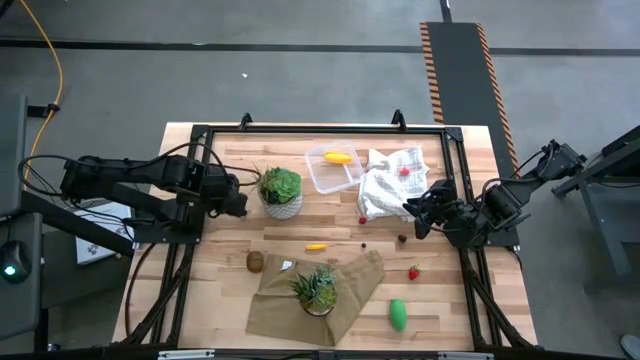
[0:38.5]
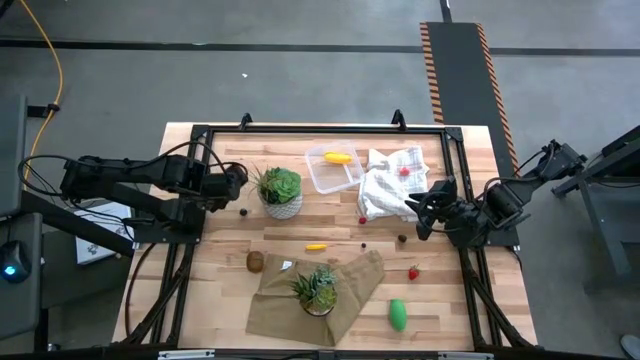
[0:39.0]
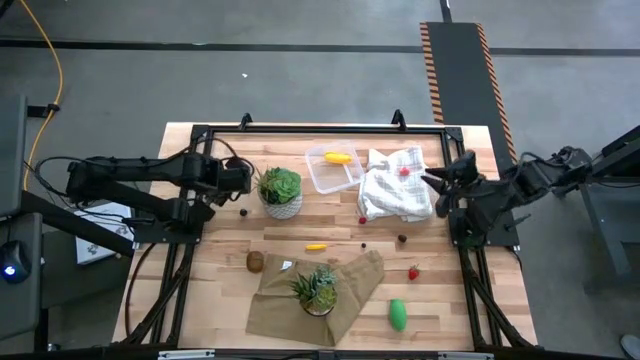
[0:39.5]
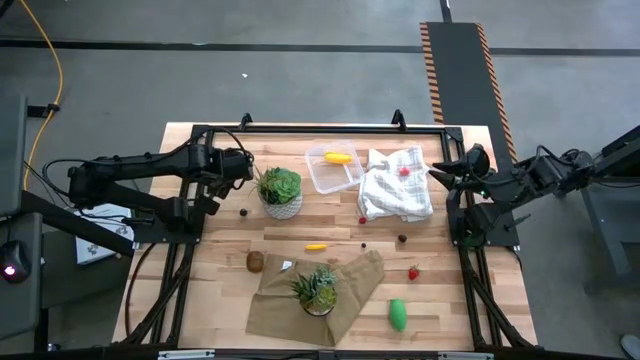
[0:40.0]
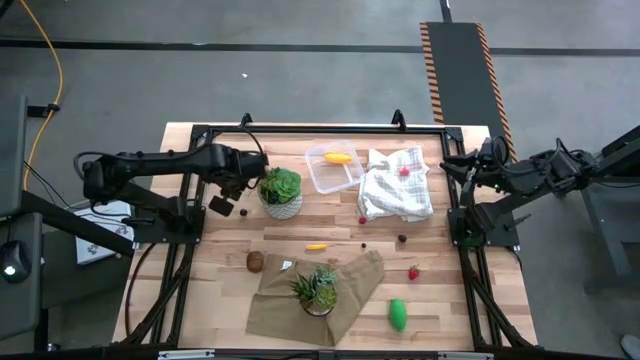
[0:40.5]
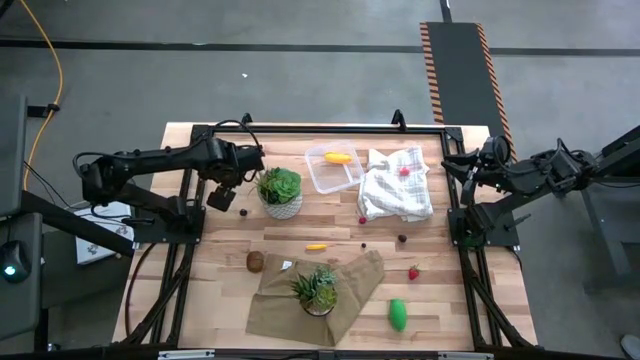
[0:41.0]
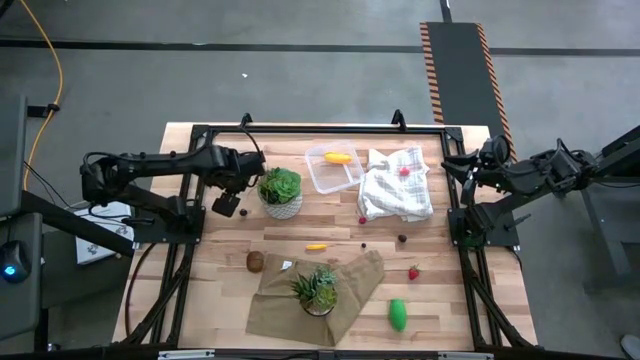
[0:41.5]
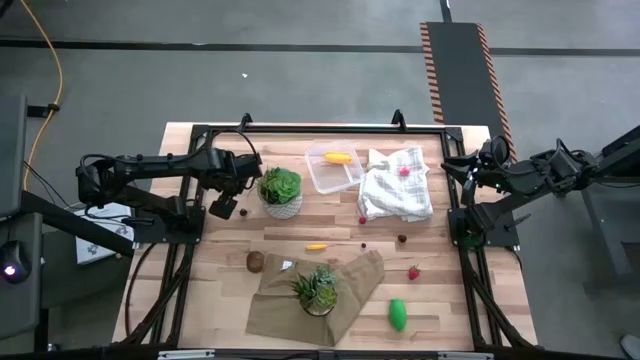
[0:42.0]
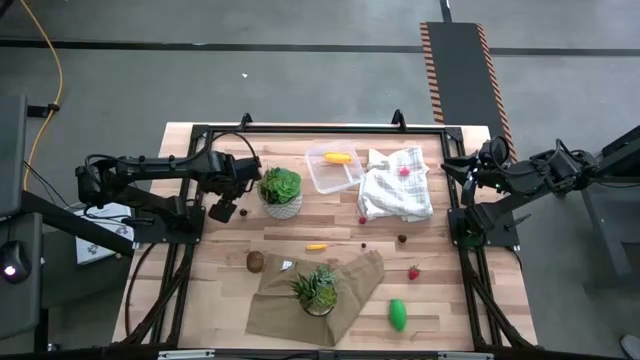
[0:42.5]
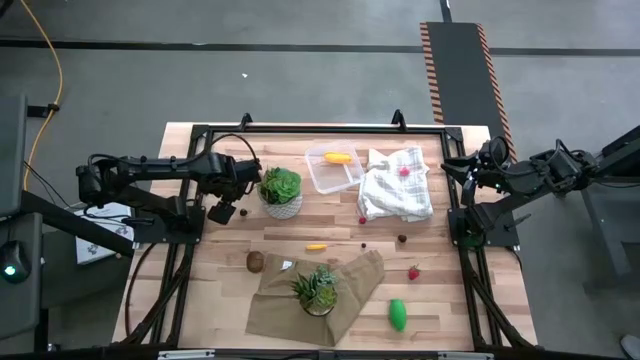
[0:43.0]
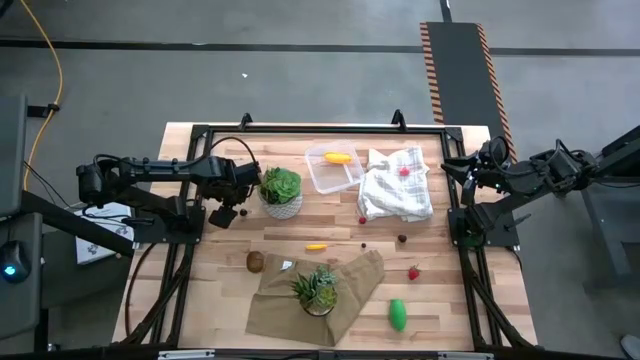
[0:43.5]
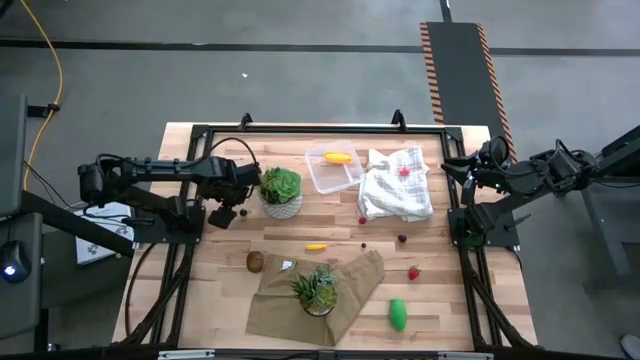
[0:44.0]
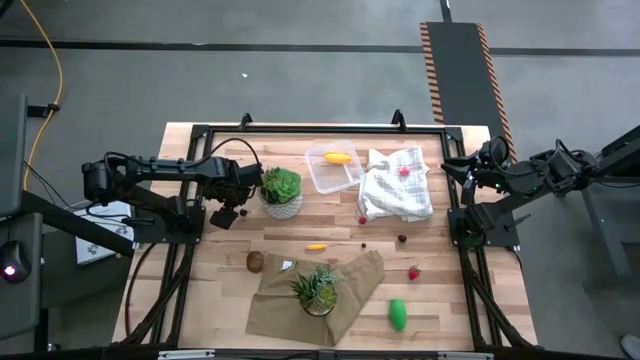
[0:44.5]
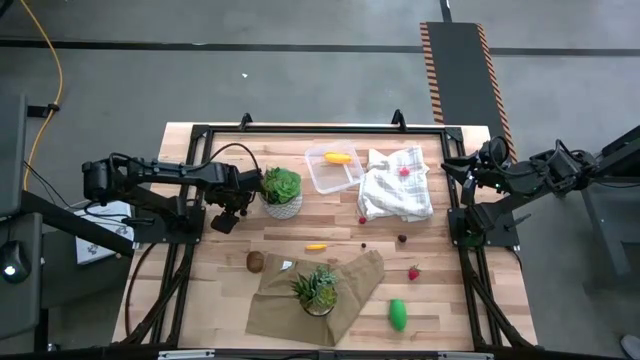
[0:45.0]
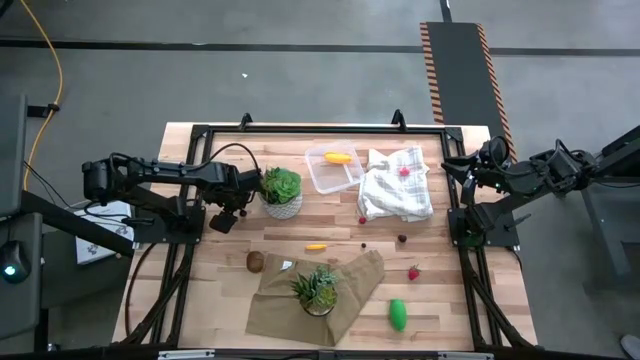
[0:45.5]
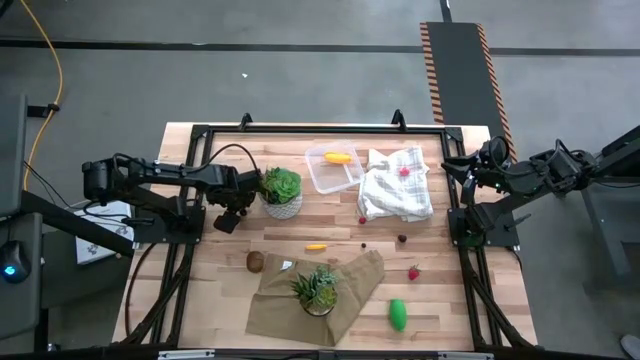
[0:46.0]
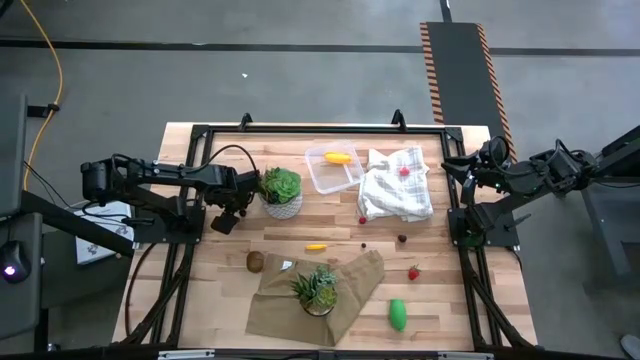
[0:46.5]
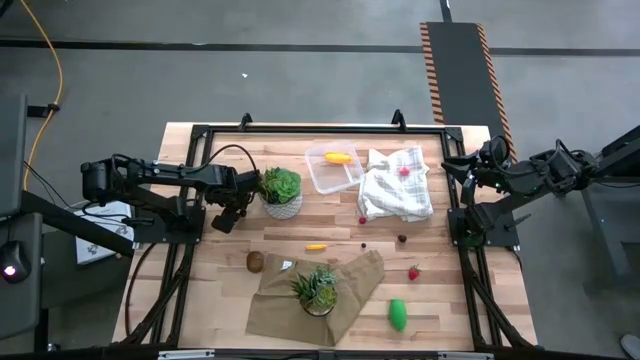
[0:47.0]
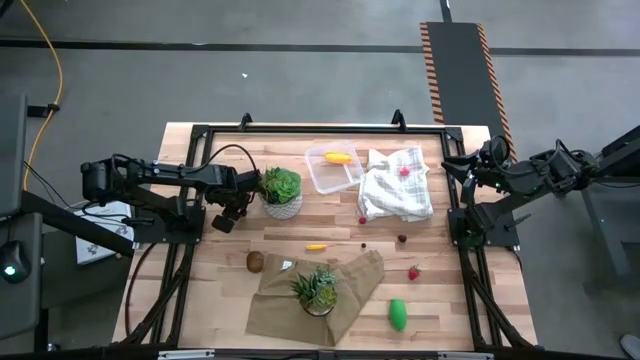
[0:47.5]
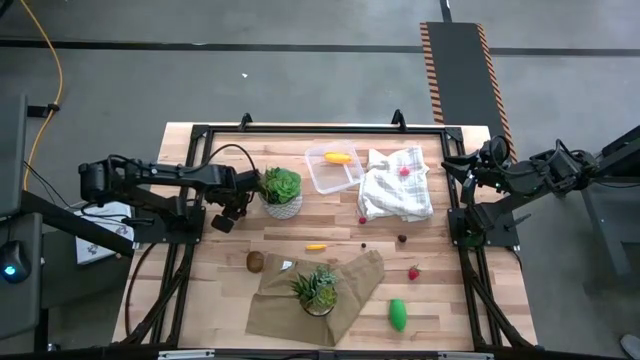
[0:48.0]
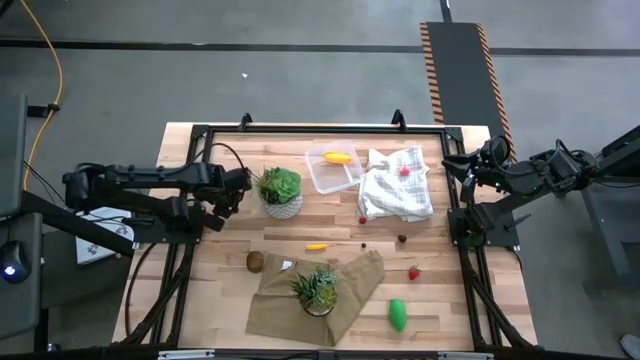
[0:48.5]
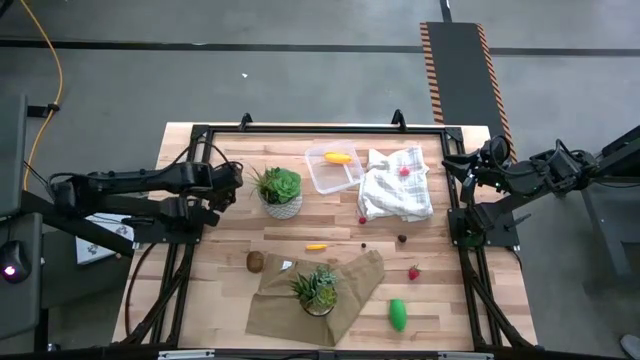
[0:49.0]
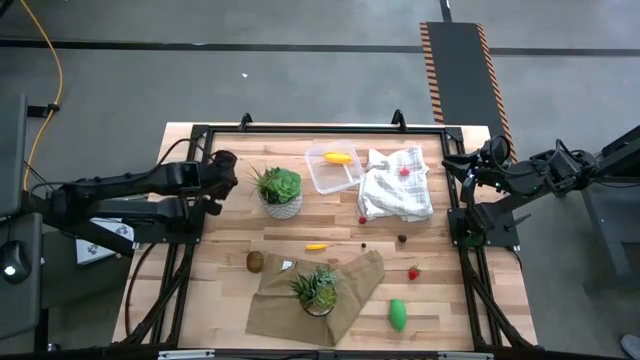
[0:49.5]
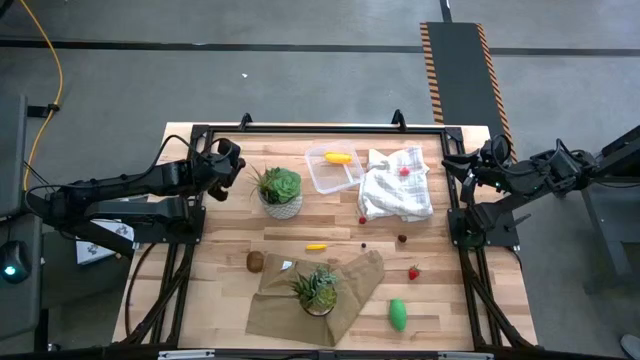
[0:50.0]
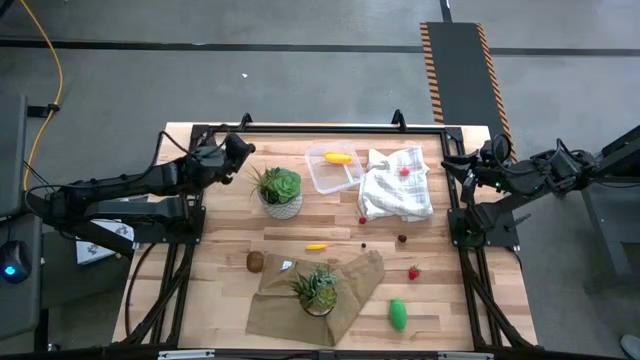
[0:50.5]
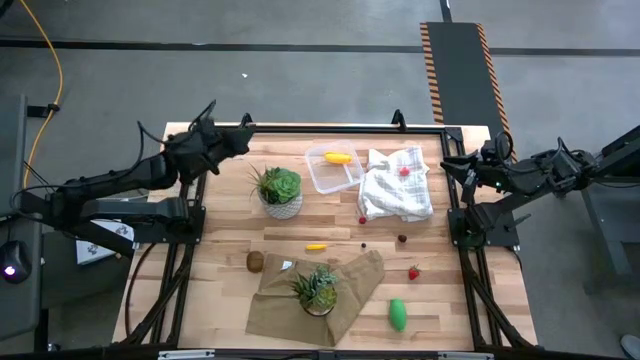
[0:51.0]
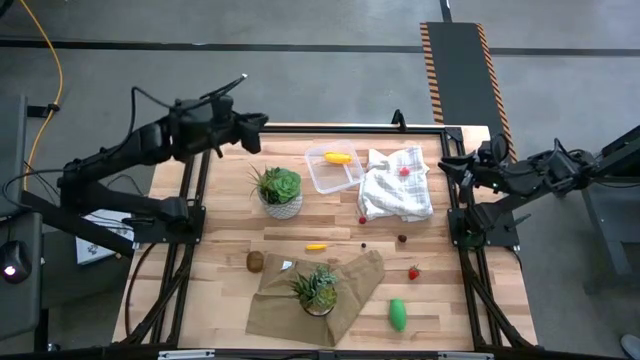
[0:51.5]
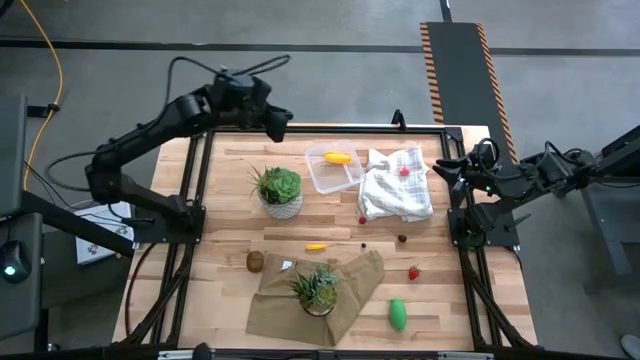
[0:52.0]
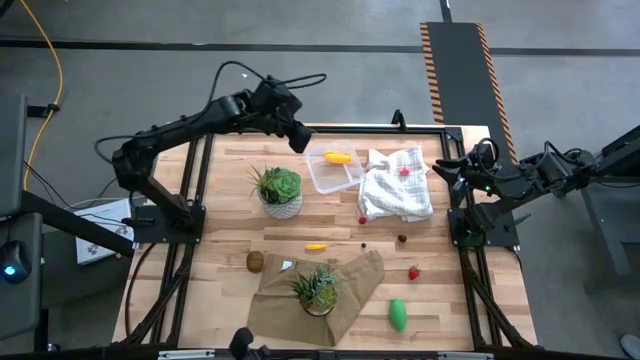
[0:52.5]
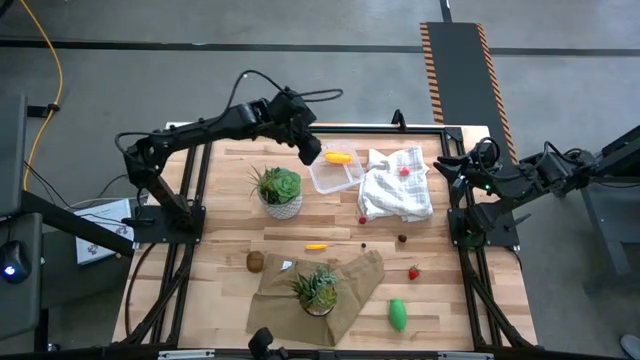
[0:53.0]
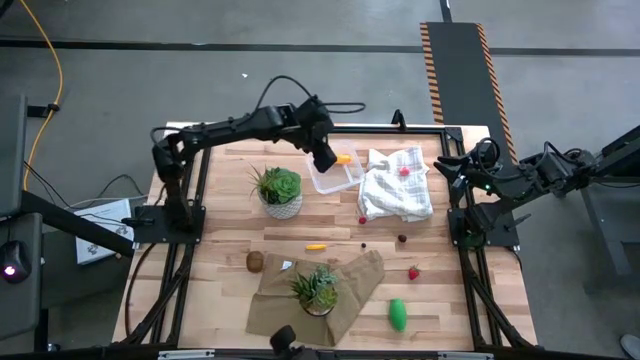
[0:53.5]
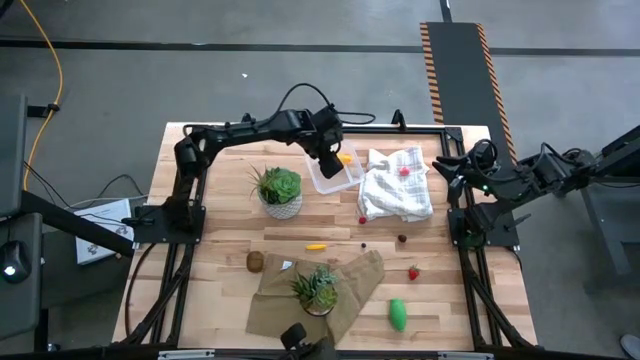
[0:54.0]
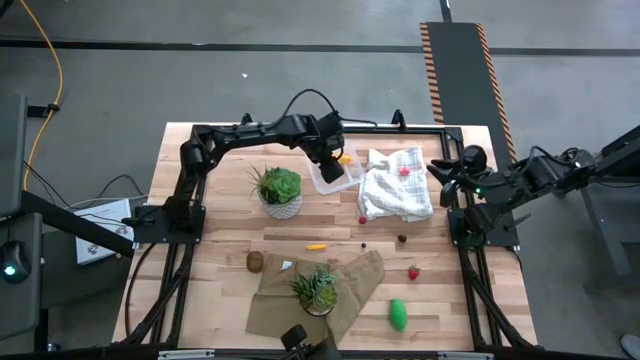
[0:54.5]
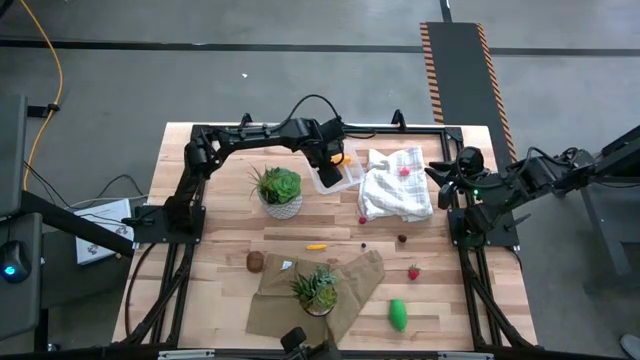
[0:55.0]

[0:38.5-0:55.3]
Task: Pick and placing Produce into tupperware
Put the black cherry into the transparent bin
